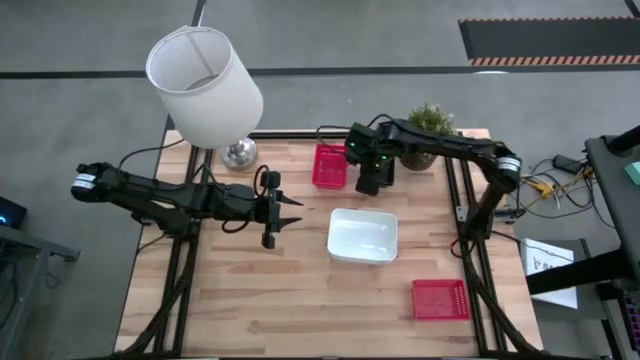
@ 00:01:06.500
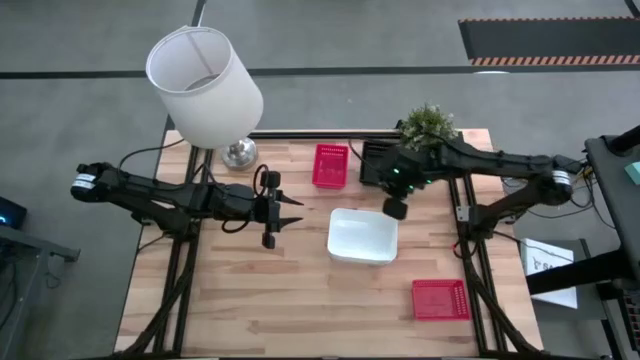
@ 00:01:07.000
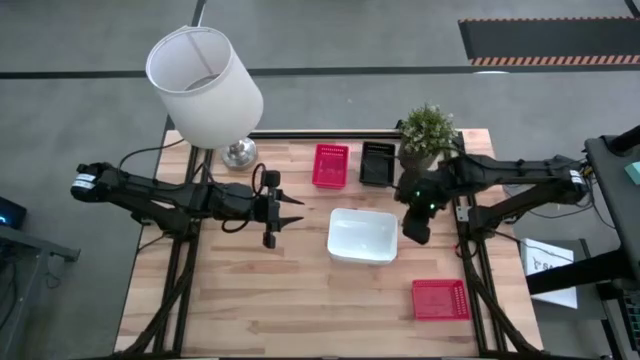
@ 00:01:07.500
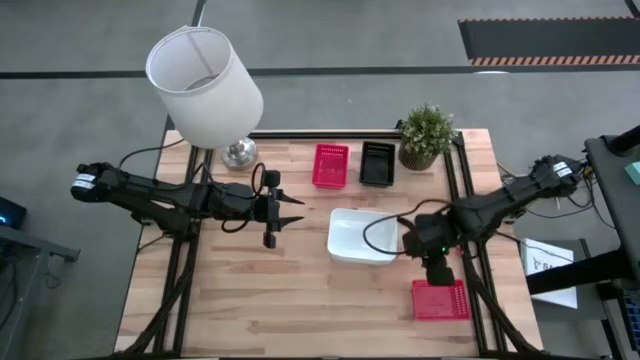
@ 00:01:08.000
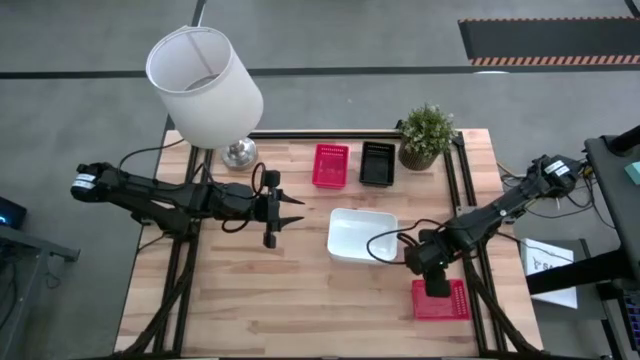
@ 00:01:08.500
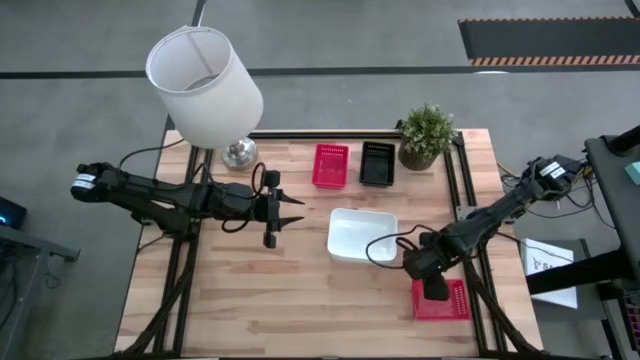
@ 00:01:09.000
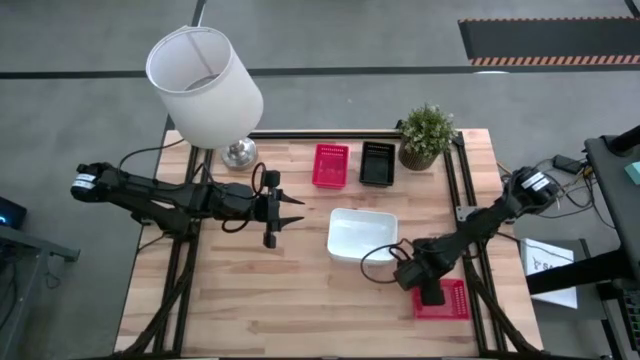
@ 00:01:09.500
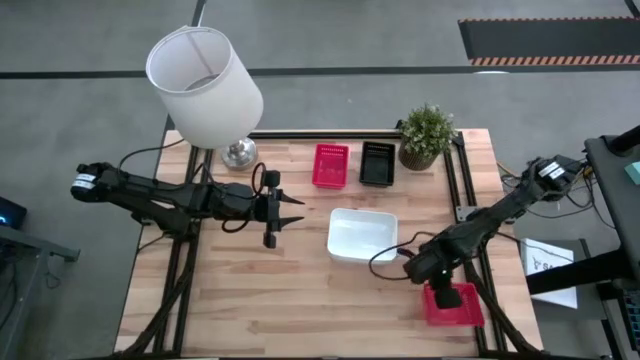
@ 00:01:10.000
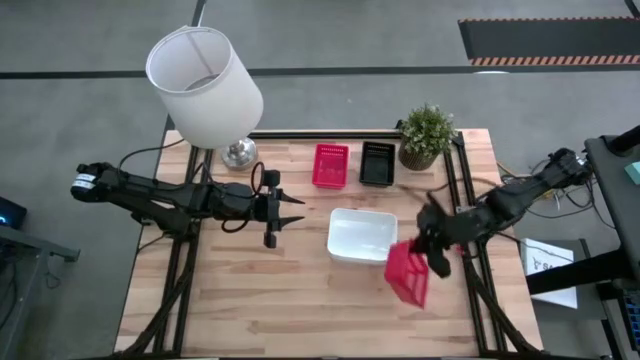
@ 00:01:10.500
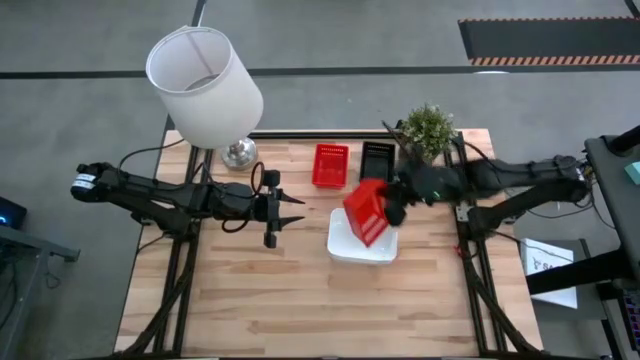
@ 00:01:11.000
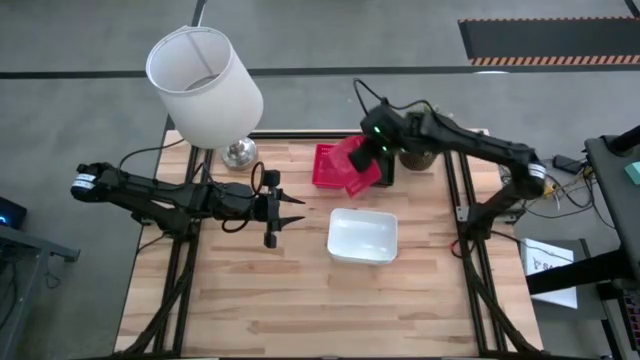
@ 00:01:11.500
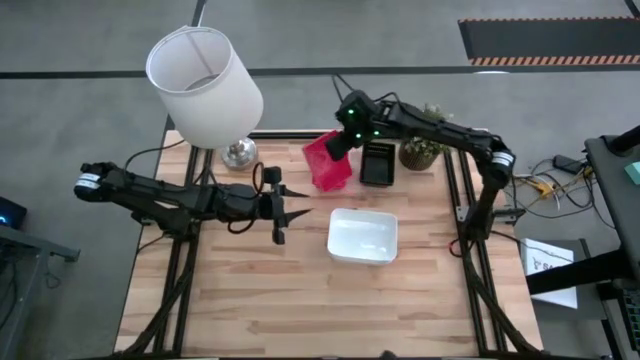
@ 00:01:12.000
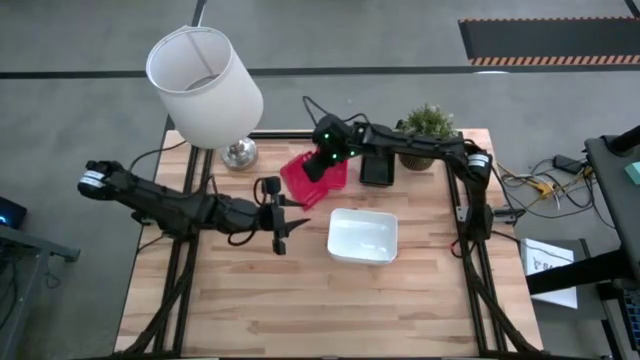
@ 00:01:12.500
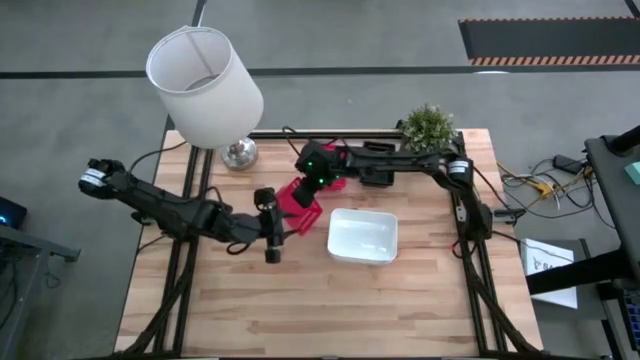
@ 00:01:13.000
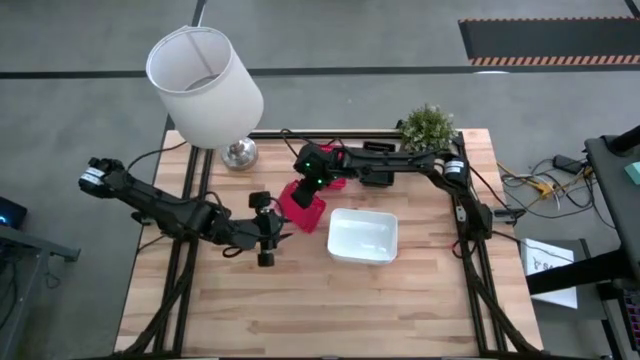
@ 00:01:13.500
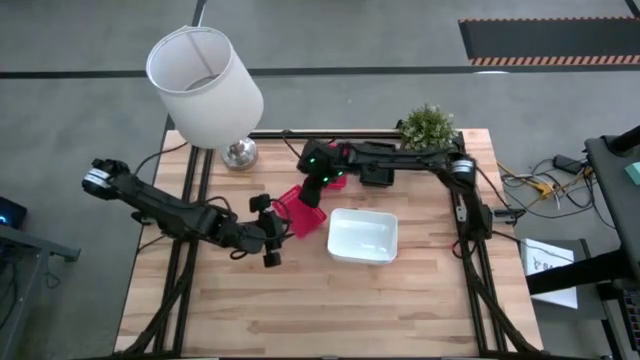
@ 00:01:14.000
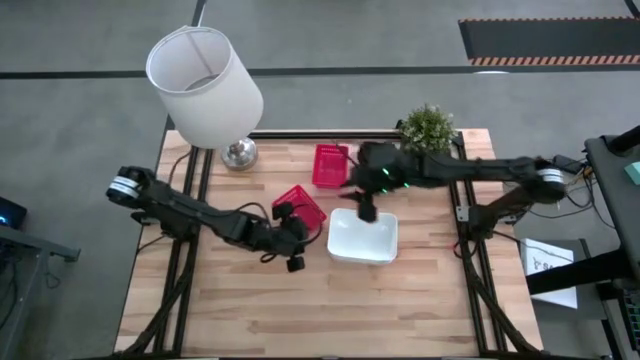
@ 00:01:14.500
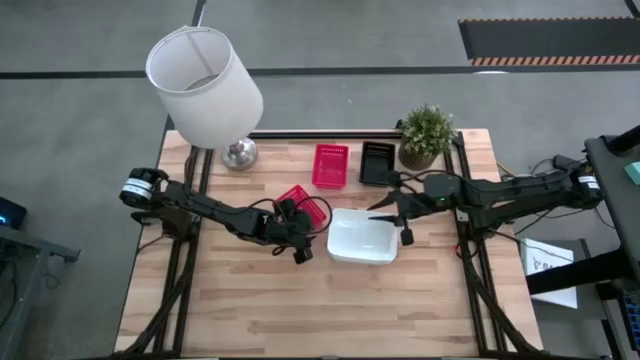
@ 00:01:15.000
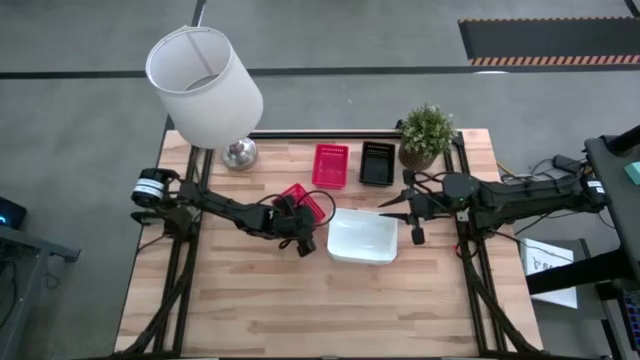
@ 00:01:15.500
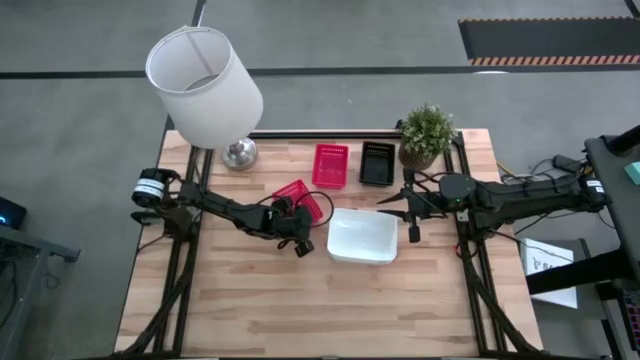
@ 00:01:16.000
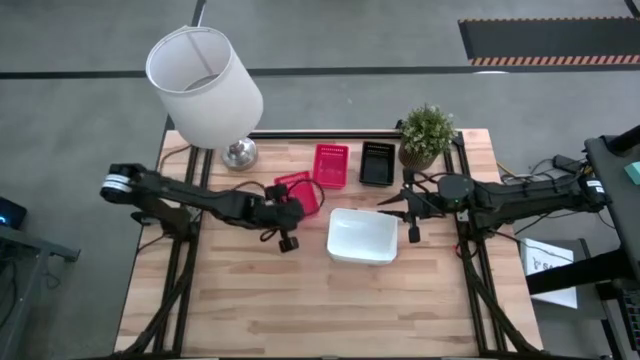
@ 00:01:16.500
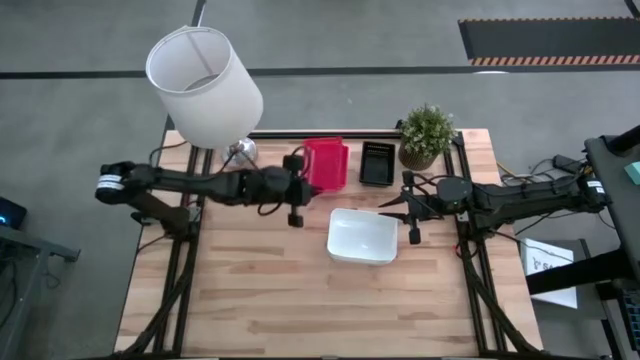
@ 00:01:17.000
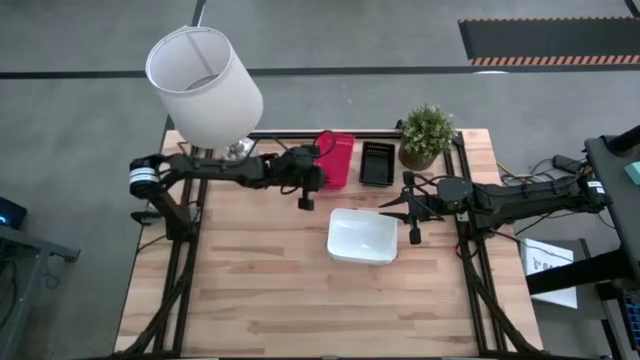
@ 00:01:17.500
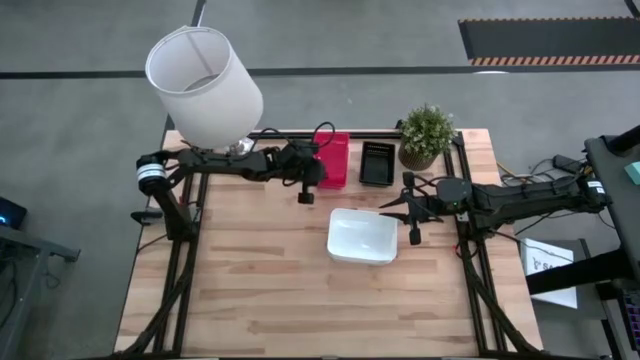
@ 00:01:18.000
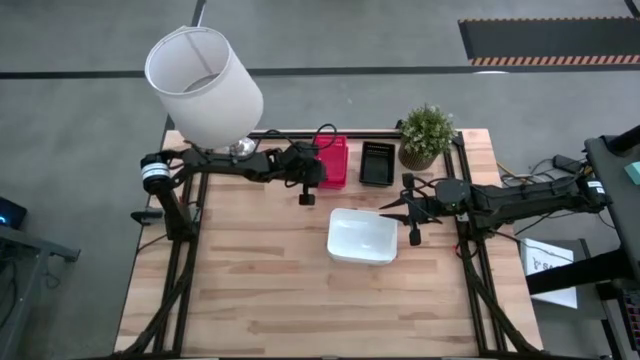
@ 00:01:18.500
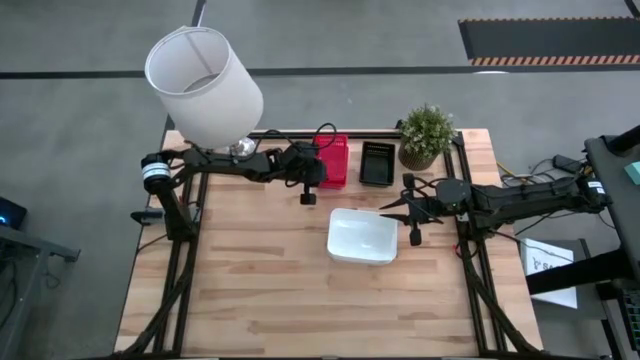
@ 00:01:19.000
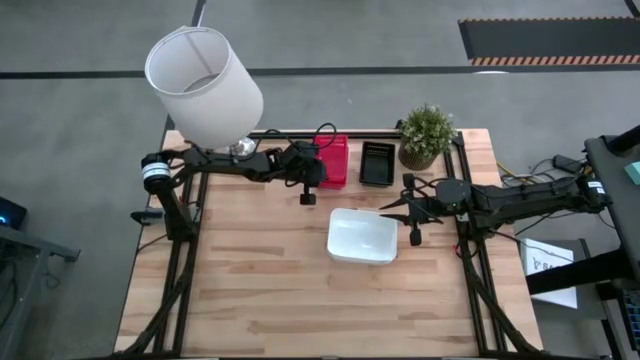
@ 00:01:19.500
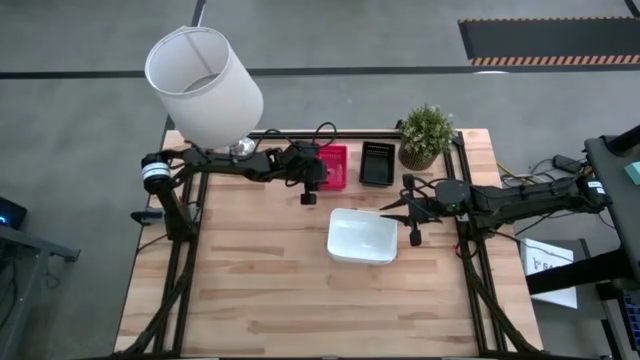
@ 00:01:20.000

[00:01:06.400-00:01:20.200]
Stack the bottom red bin into the other red bins

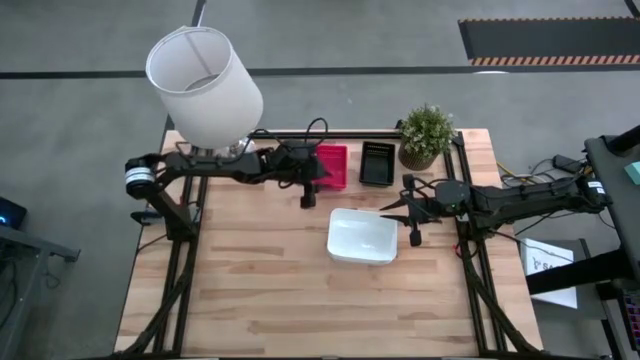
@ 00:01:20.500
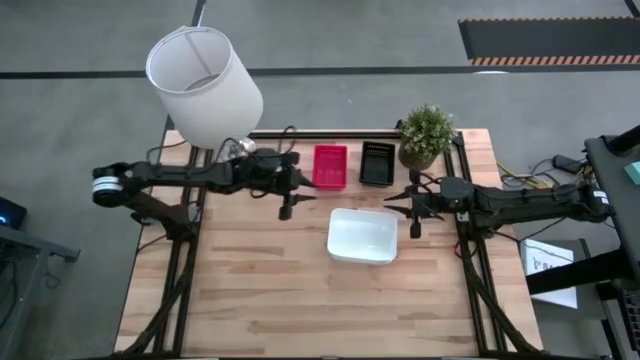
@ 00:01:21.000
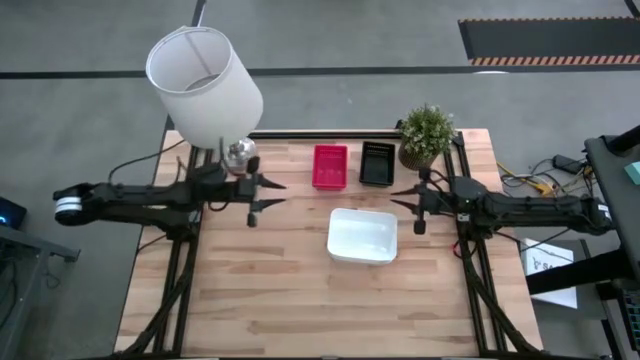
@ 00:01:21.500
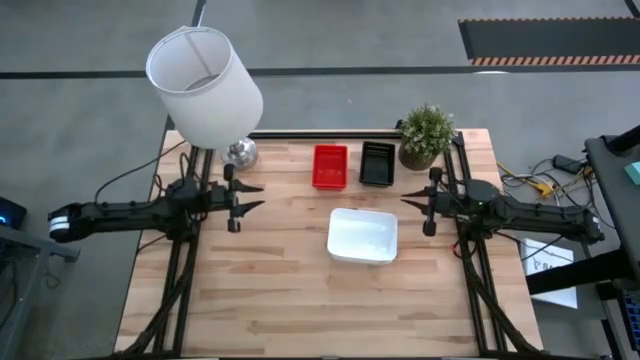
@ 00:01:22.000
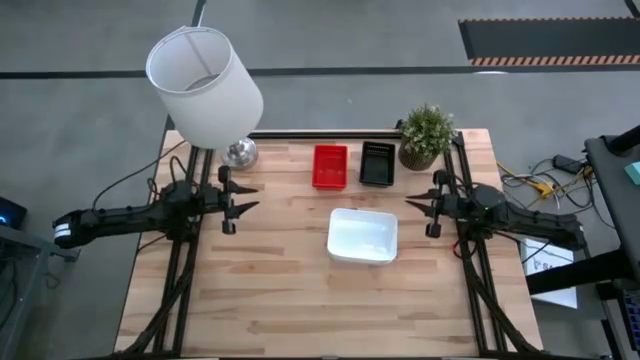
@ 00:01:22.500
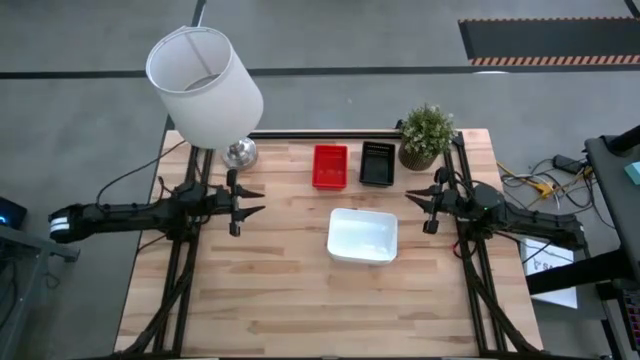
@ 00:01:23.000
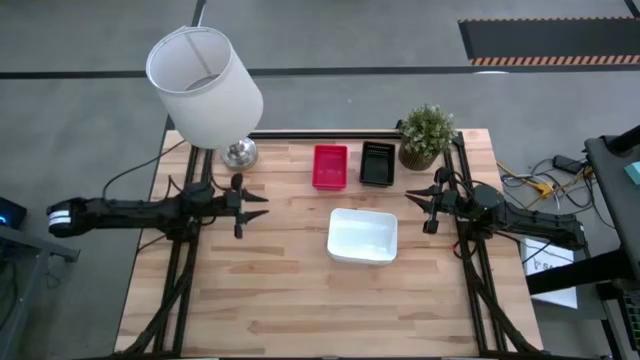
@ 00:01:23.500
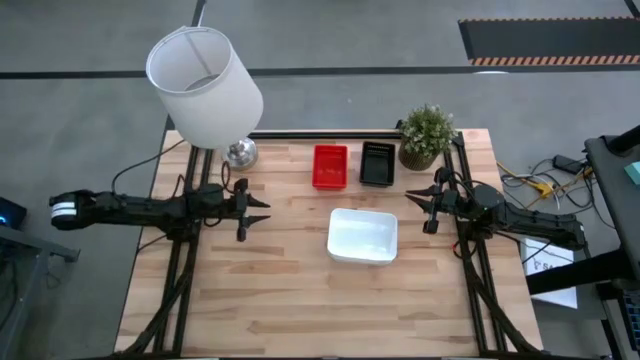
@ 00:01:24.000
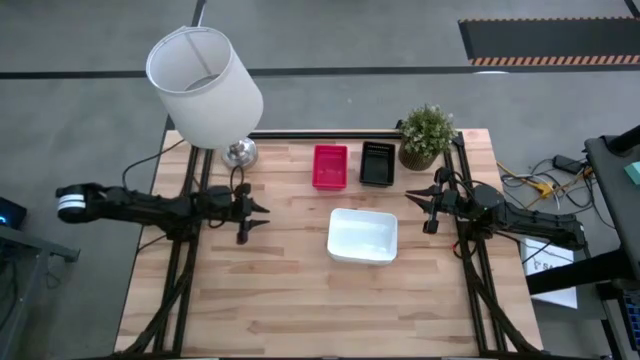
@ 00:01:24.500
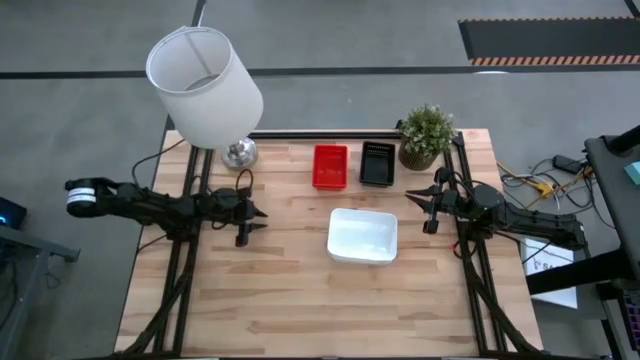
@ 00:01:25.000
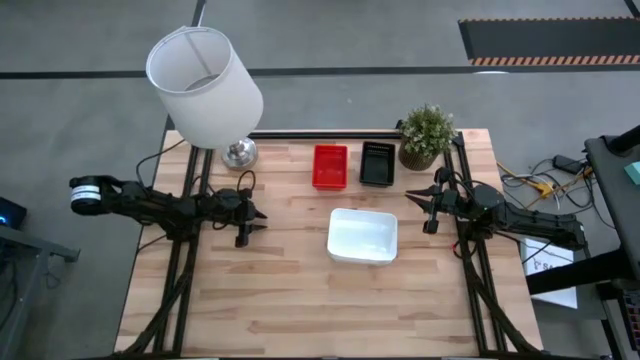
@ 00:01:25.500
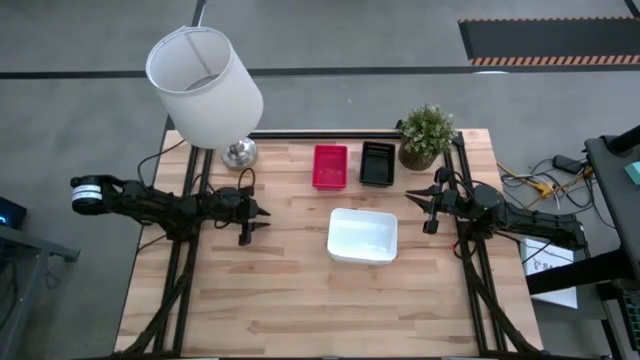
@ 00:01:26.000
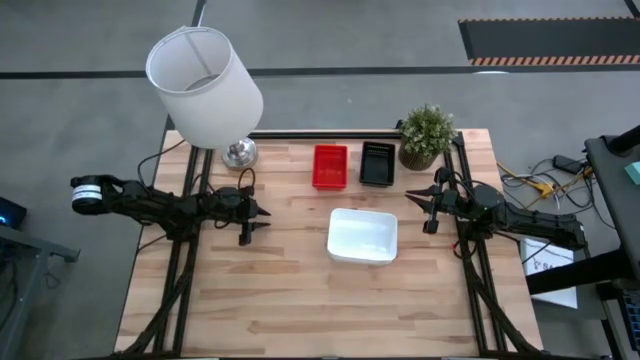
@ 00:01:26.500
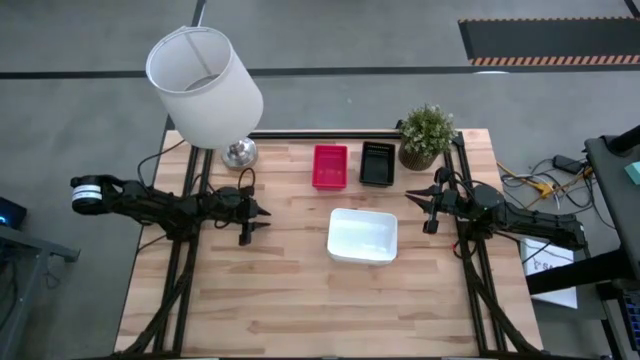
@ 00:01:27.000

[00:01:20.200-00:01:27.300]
Return to Home Position
